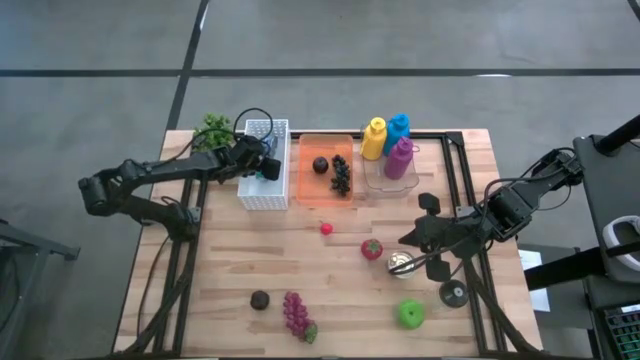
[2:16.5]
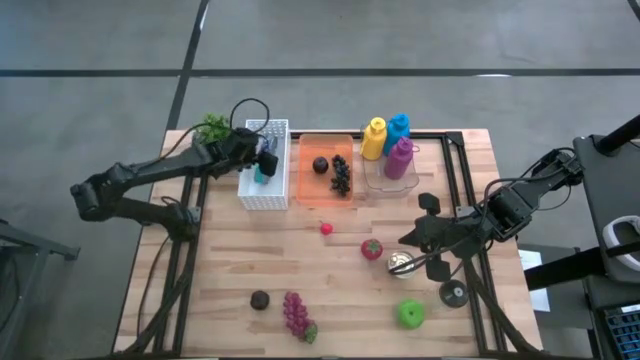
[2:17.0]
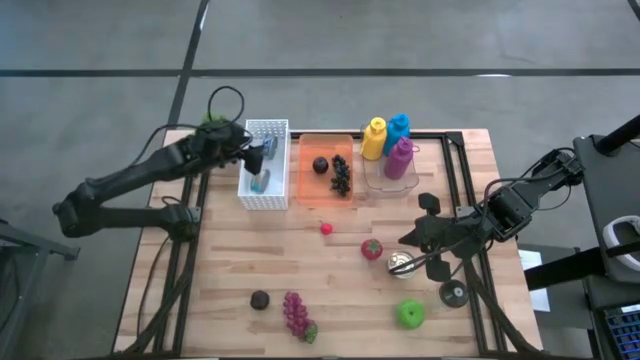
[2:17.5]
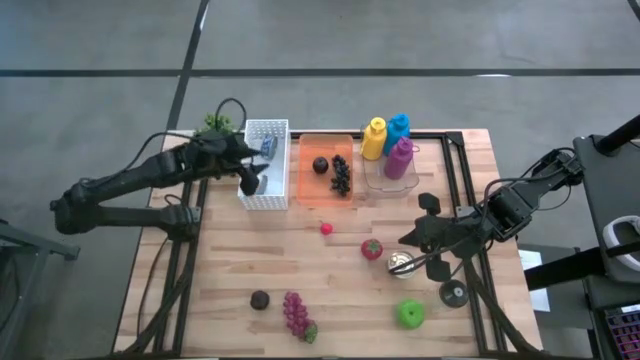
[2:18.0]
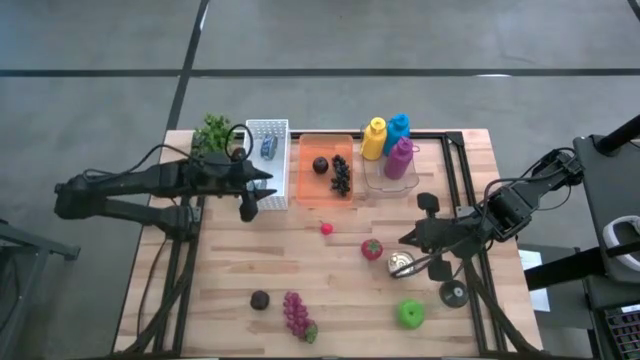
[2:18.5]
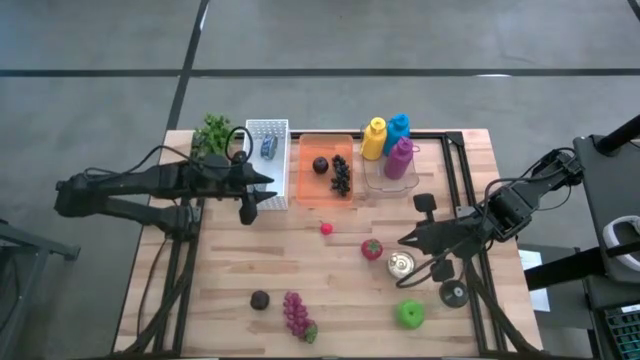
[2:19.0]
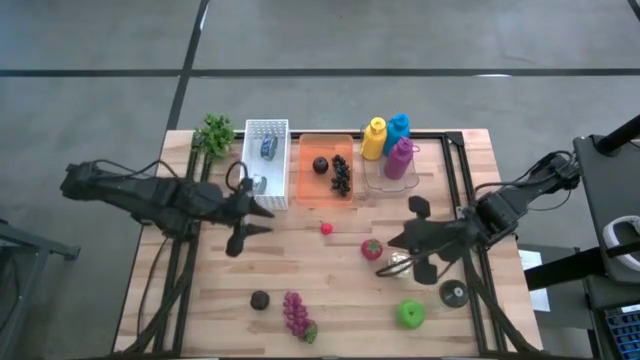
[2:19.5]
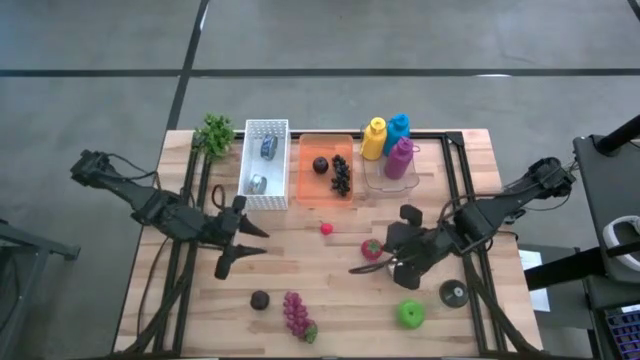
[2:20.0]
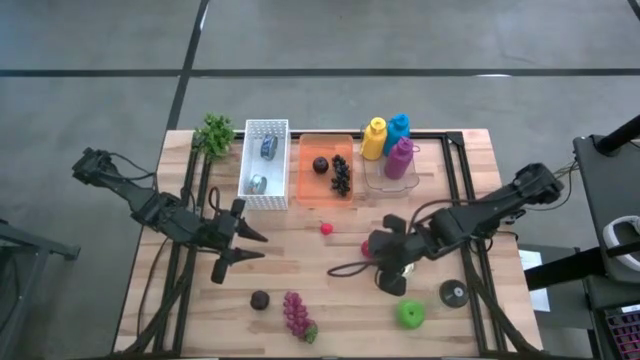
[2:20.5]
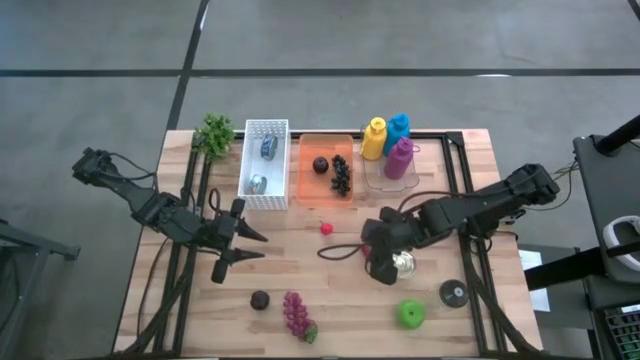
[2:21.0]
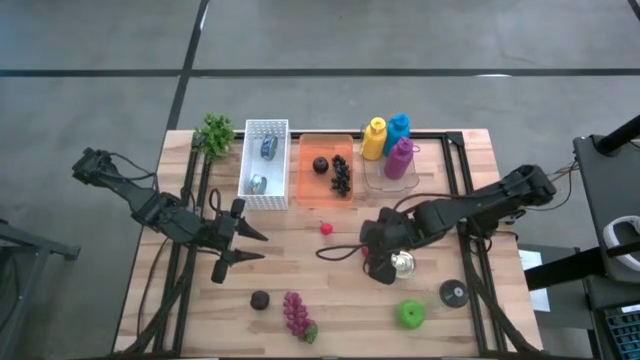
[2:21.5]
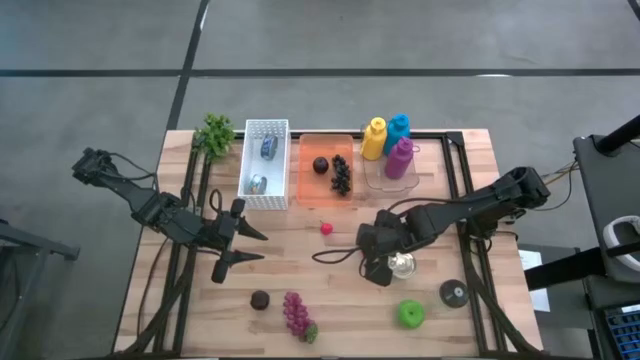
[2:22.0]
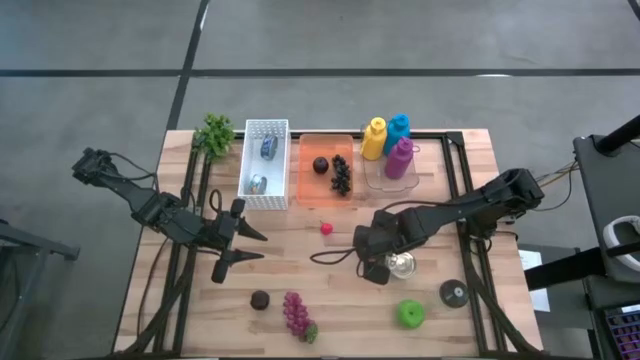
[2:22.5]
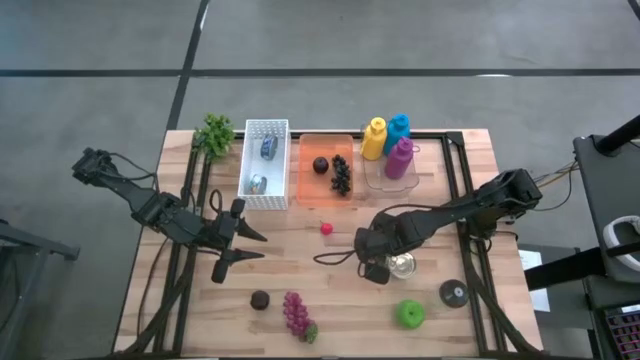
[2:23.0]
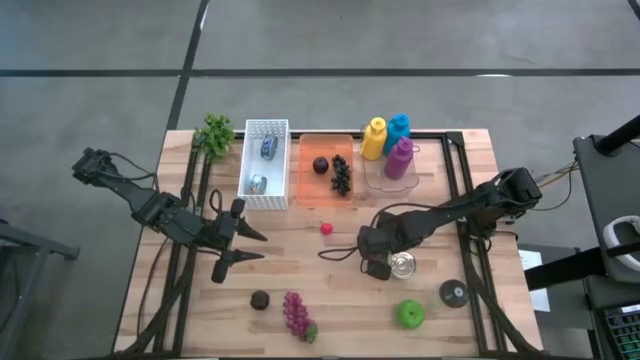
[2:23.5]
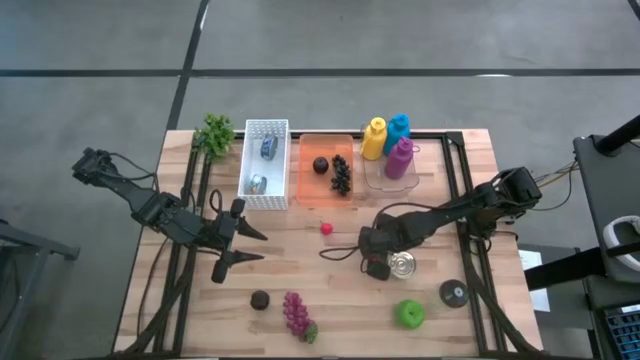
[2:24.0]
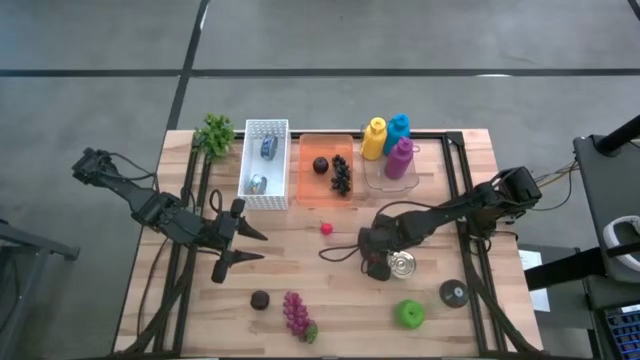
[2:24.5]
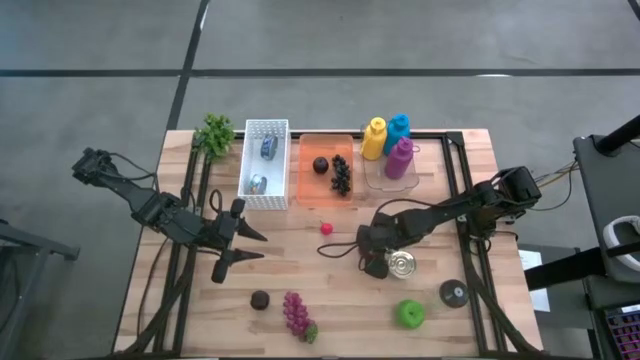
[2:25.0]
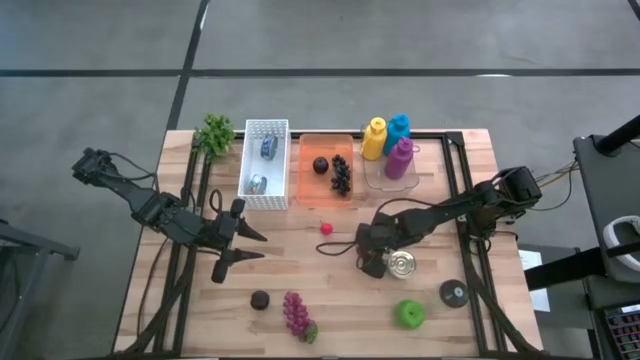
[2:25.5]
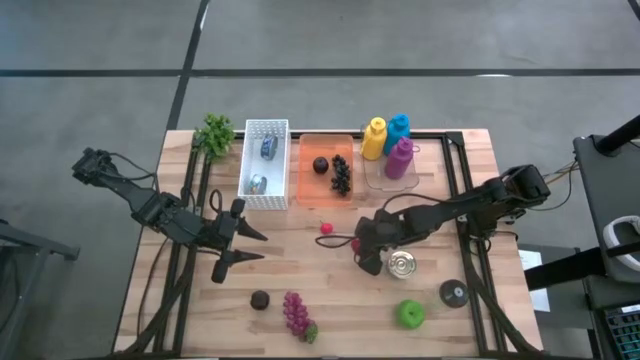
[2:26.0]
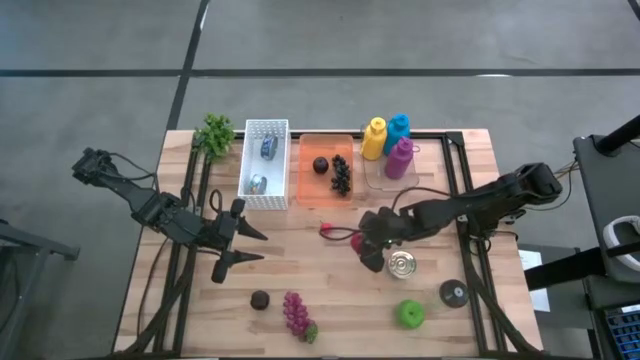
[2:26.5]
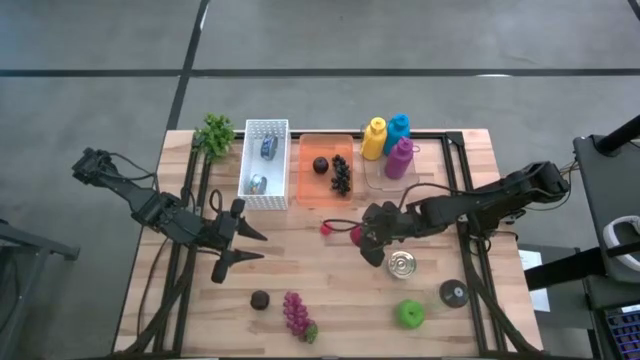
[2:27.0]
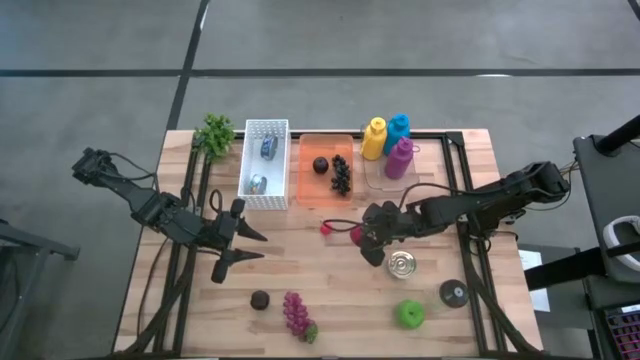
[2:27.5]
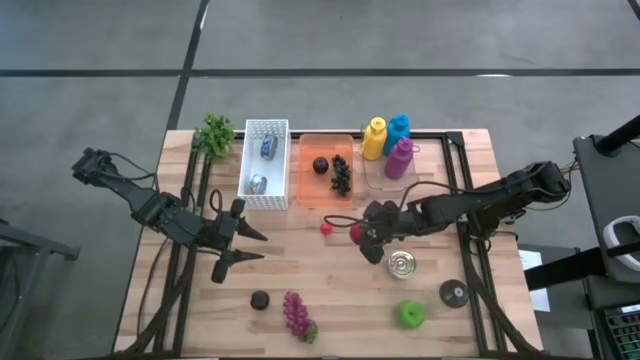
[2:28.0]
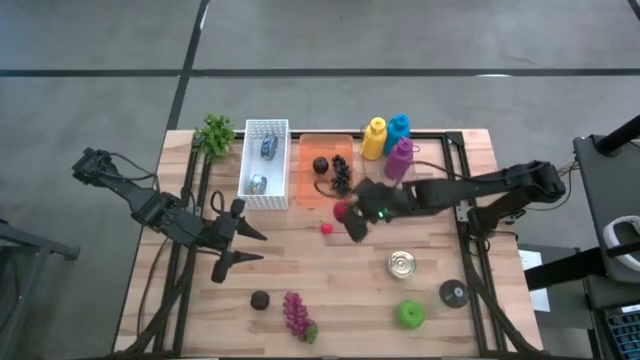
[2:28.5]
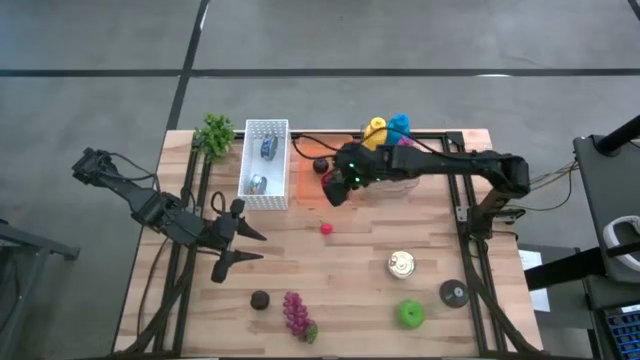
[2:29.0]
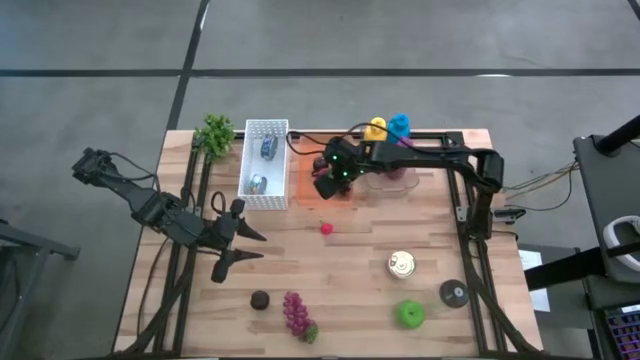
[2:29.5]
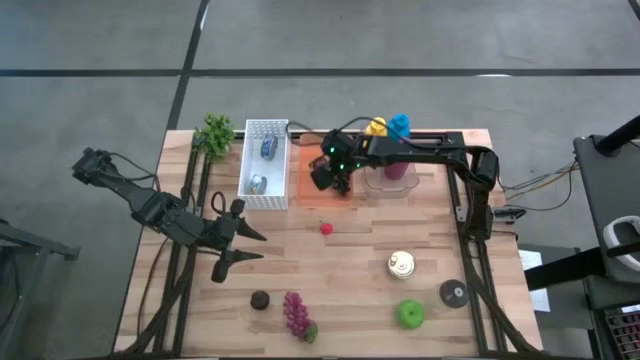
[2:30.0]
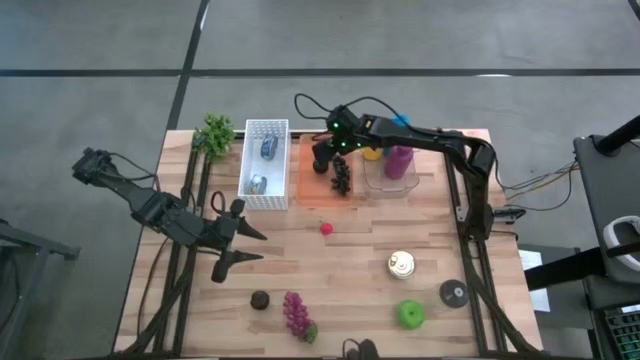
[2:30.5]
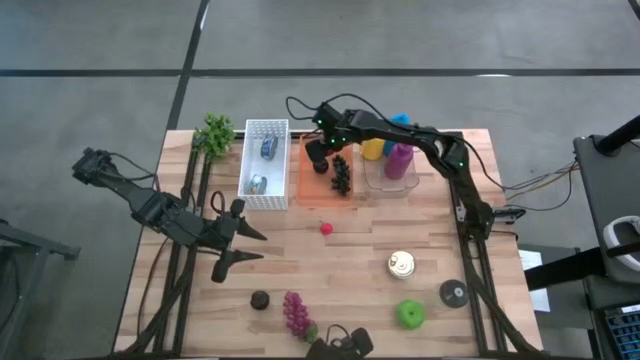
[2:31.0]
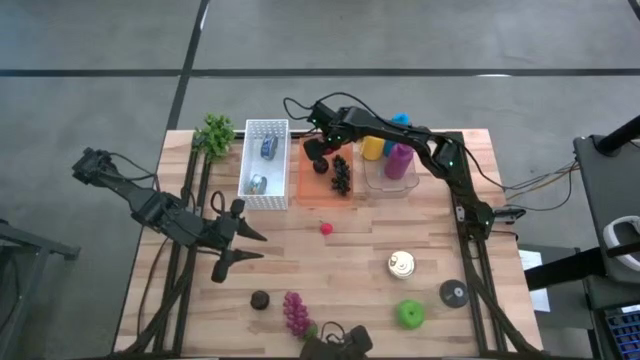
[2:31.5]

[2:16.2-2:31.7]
Task: Pick & Place Food Item
Put the tomato into the orange bin

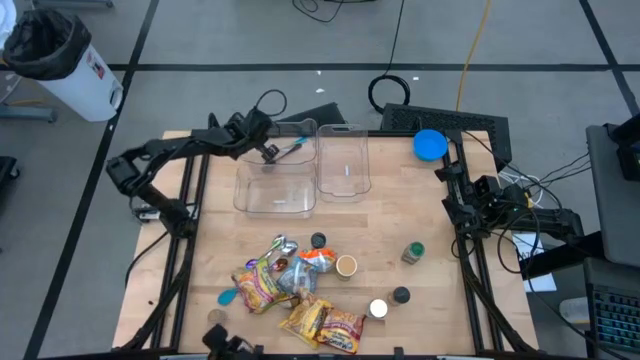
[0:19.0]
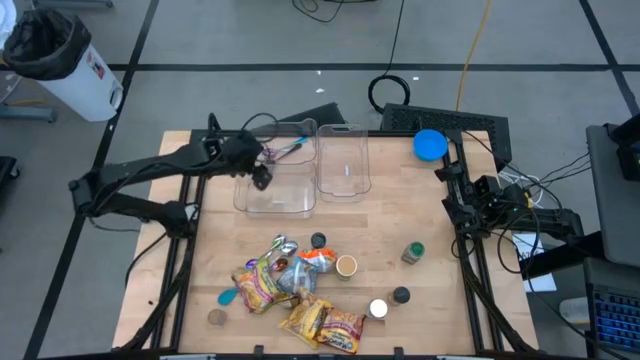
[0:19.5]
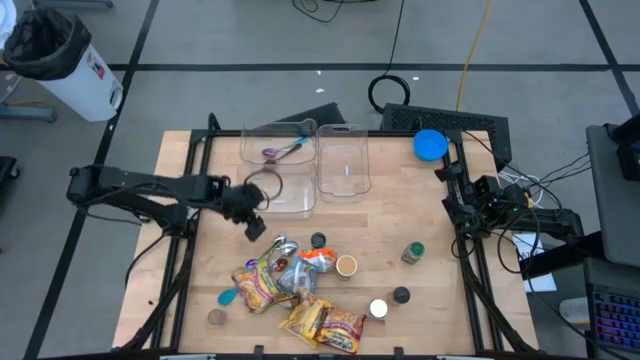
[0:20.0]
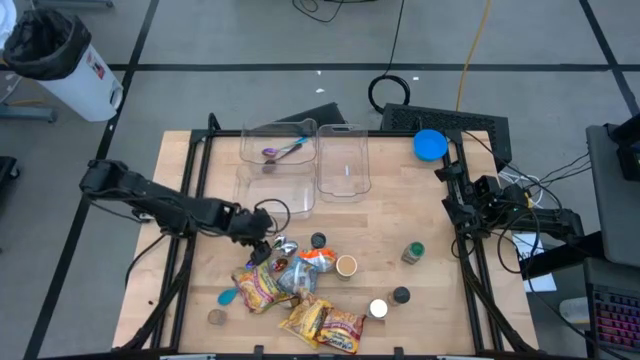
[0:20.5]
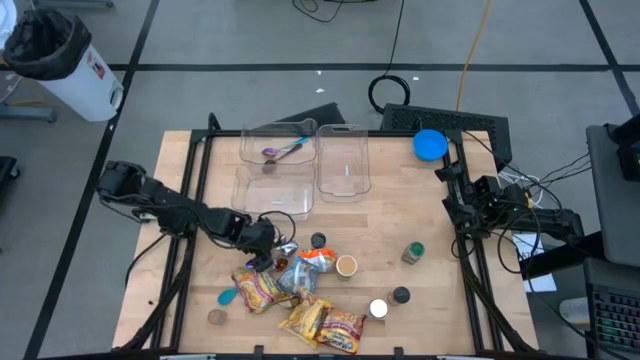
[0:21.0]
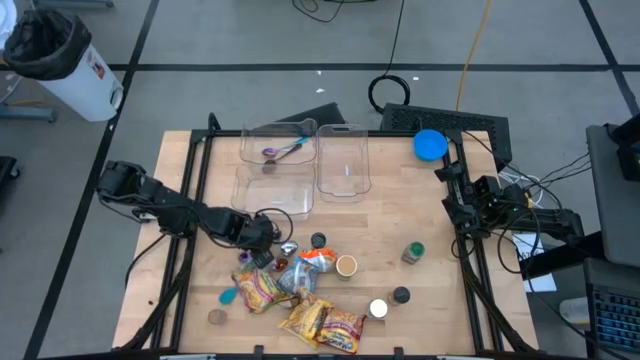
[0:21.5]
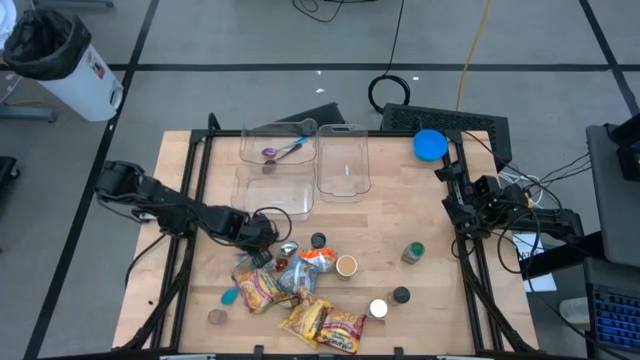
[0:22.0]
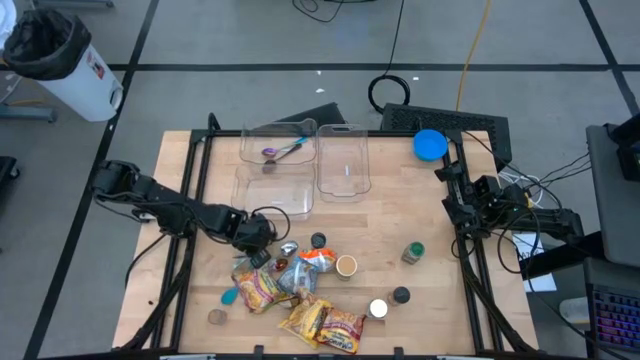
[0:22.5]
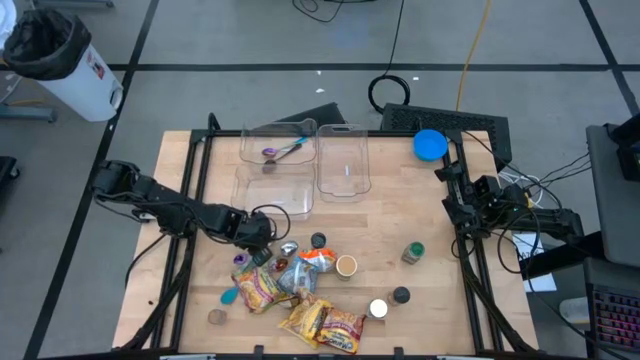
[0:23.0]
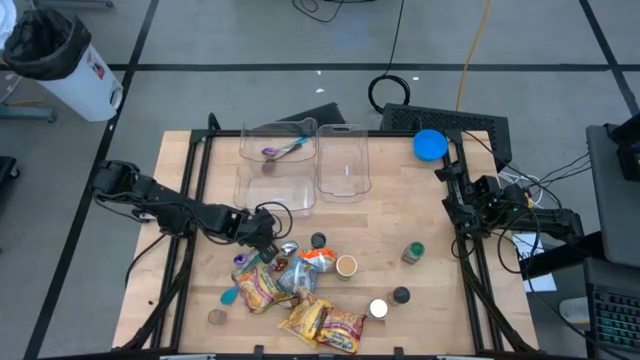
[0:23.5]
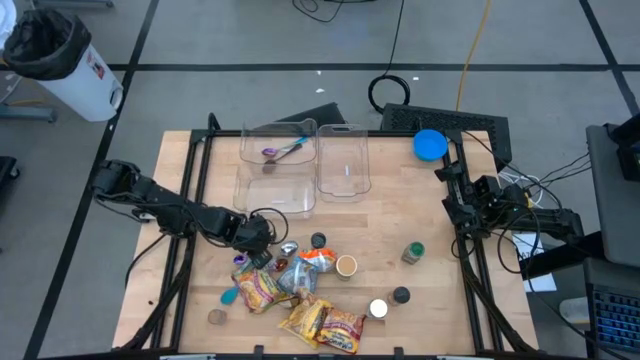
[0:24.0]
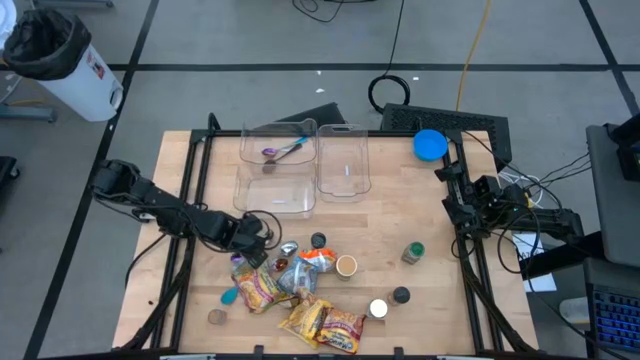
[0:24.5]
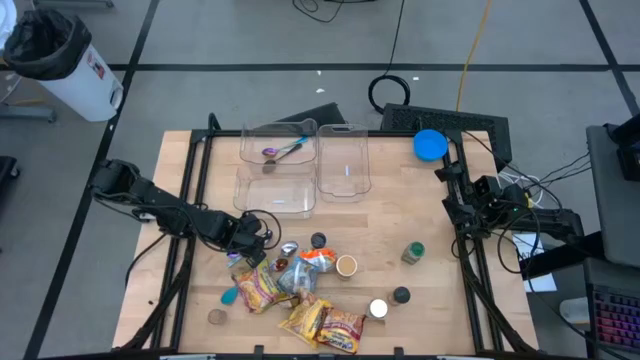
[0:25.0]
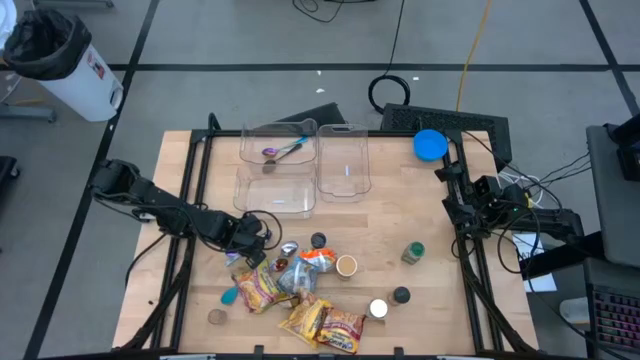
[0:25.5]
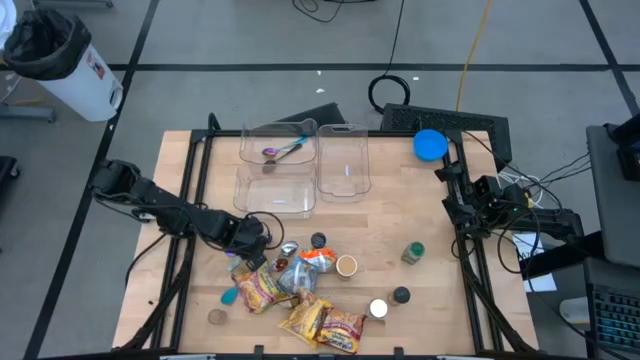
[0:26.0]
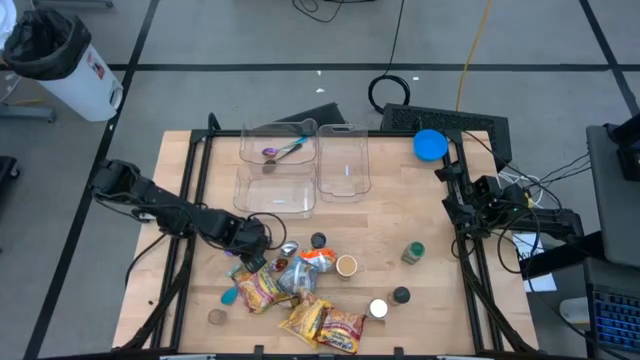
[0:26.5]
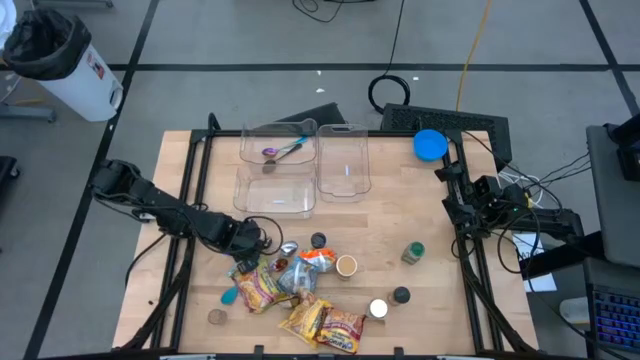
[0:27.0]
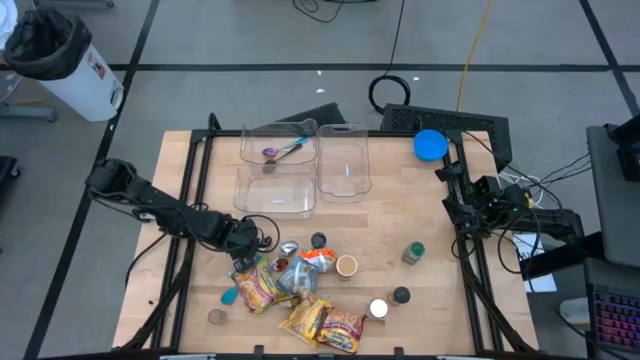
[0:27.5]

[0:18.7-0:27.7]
Task: Pick & Place Food Item
Put the green patterned spoon into the top left transparent bin
